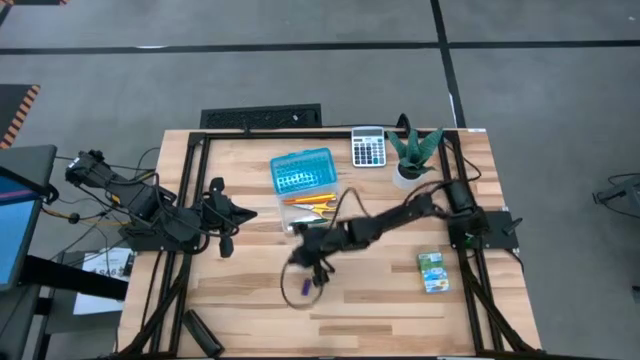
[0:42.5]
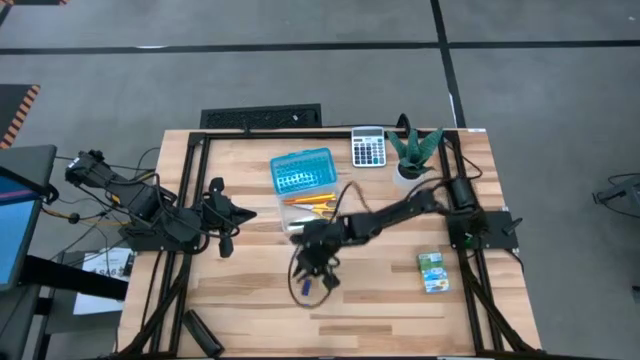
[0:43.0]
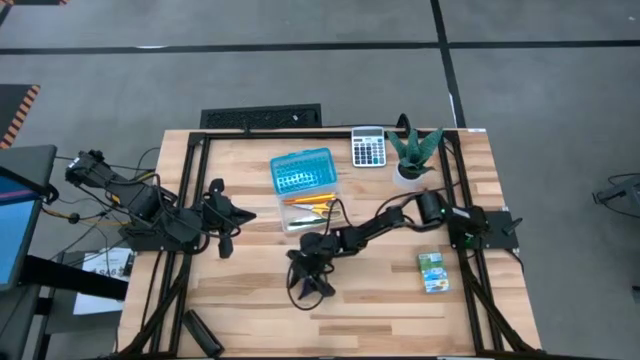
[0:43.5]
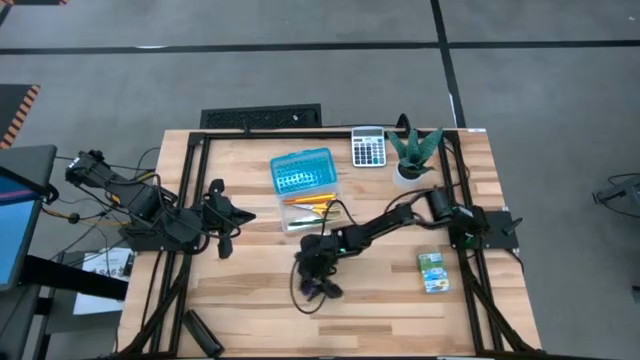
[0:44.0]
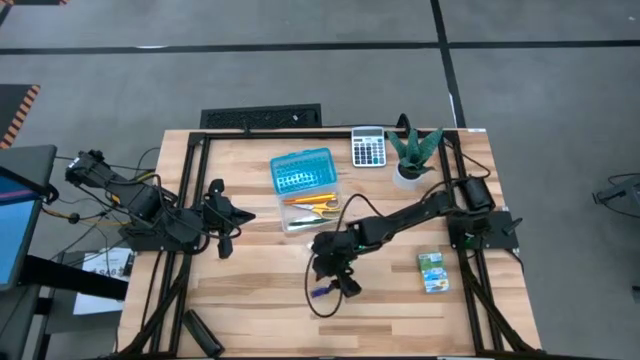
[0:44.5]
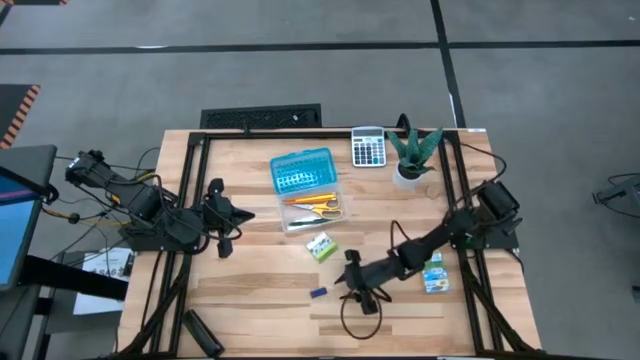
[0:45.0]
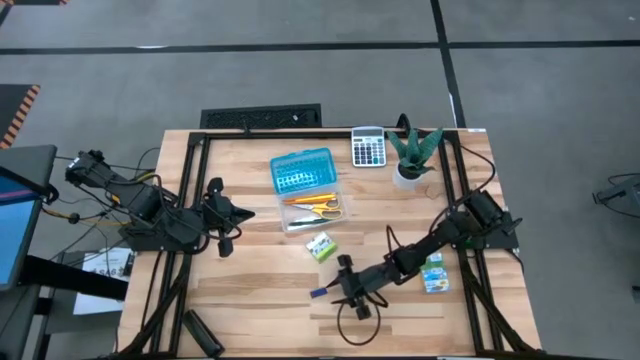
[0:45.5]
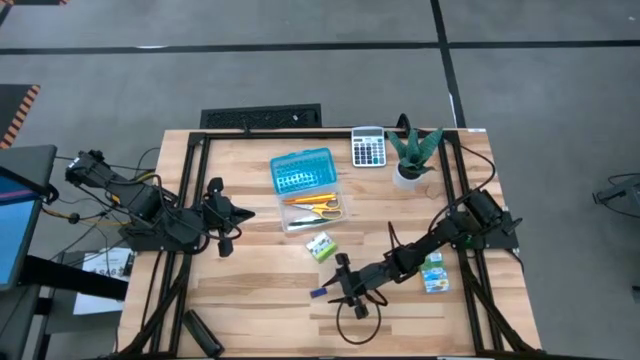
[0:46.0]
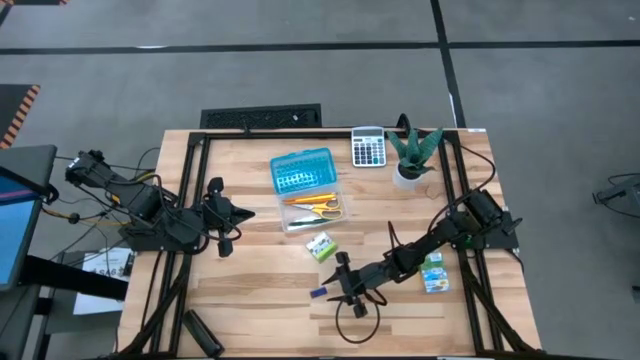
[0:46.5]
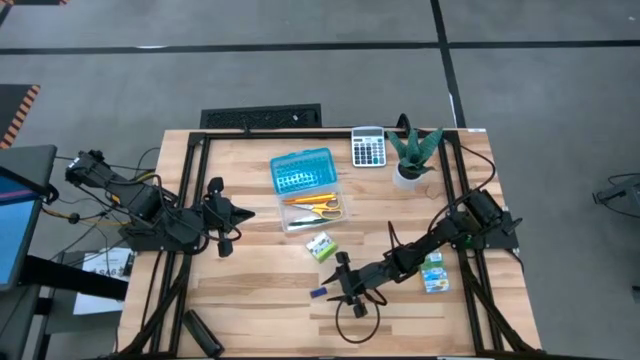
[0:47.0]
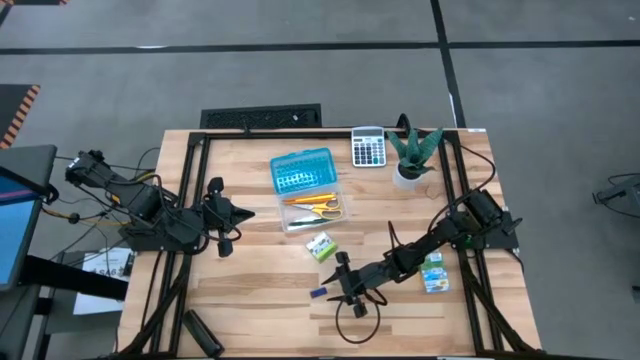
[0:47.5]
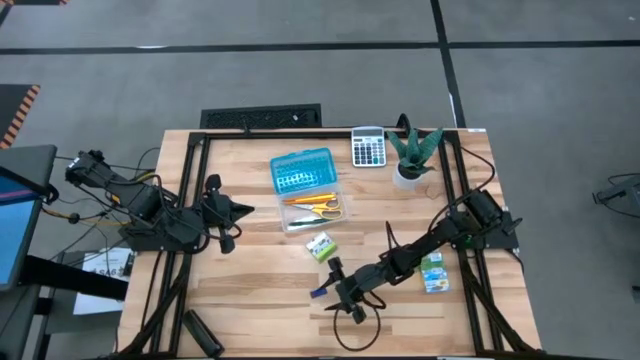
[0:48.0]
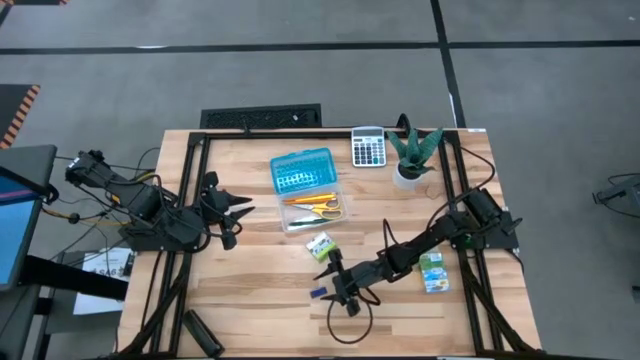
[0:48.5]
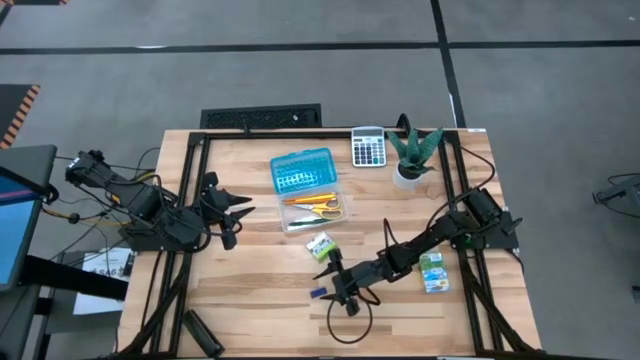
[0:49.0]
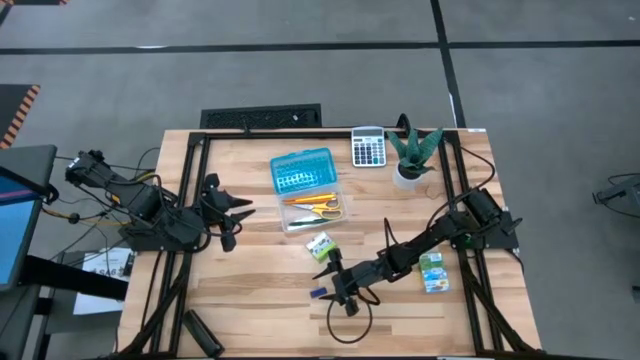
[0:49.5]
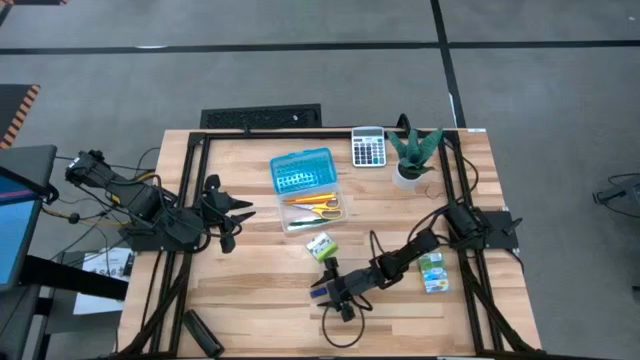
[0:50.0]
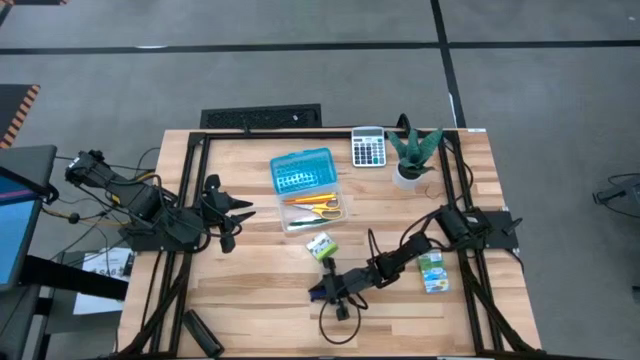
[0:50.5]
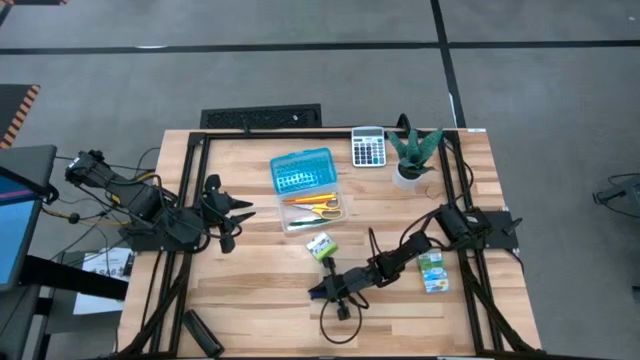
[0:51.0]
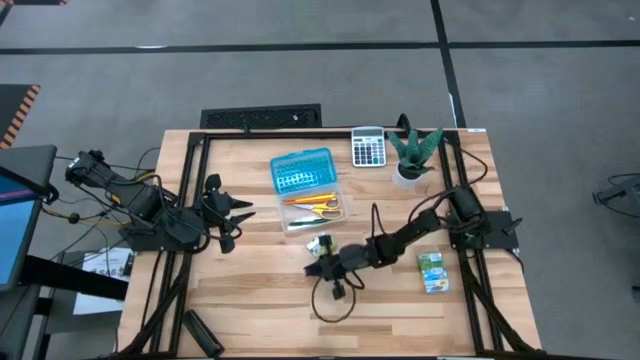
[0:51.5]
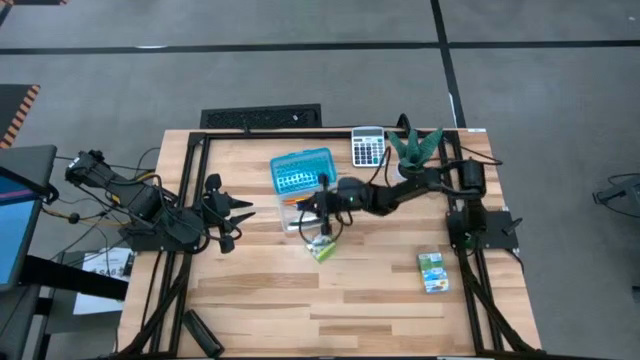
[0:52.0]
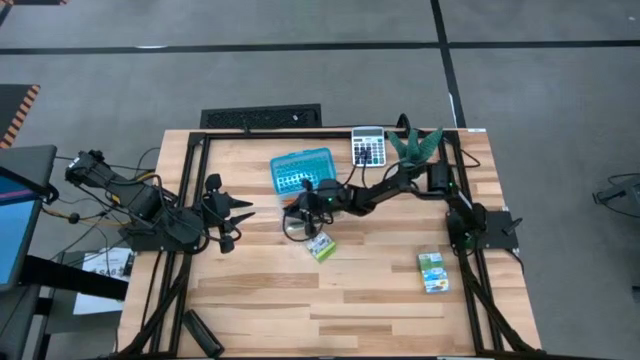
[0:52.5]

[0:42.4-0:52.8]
Task: Pack school essentials
Put the violet eraser into the supply box

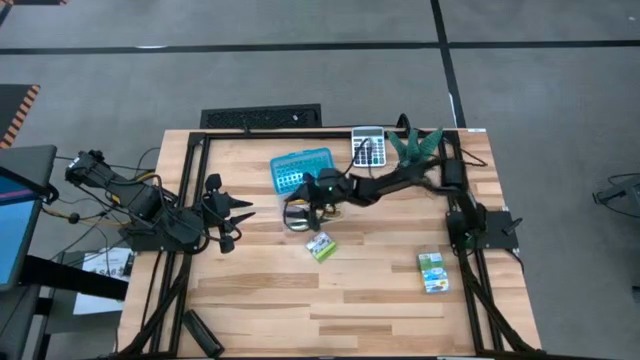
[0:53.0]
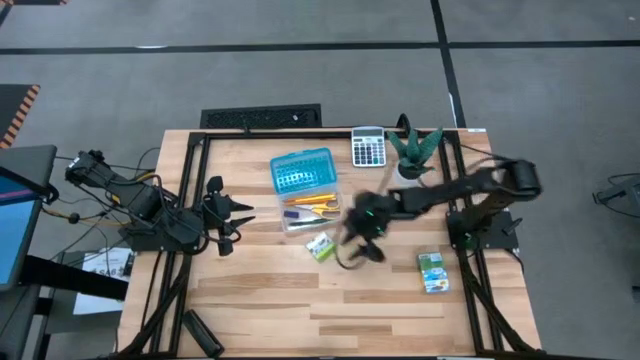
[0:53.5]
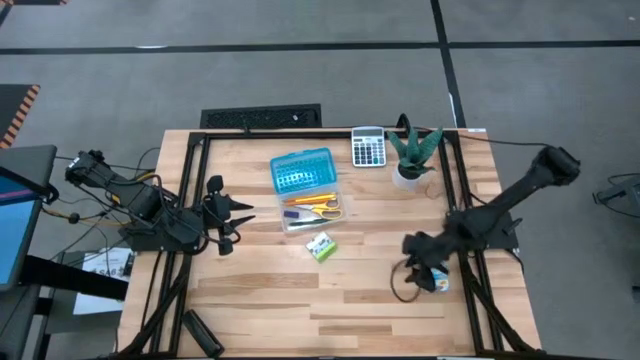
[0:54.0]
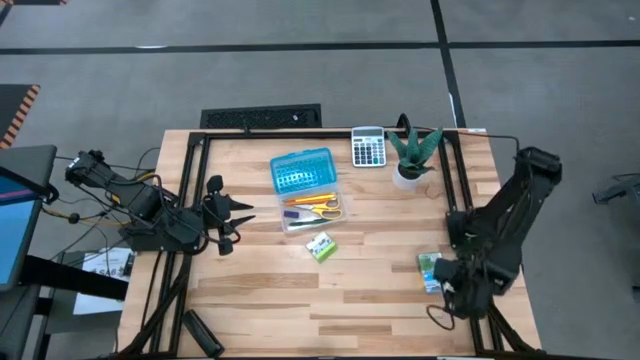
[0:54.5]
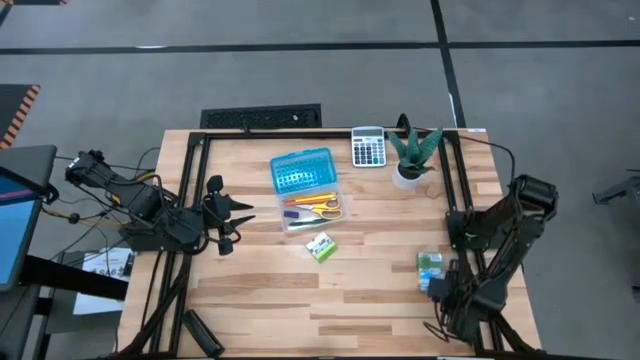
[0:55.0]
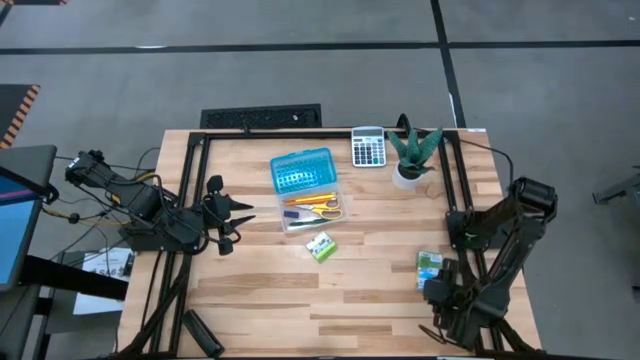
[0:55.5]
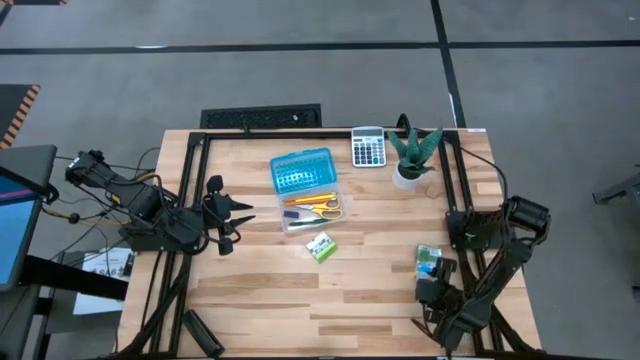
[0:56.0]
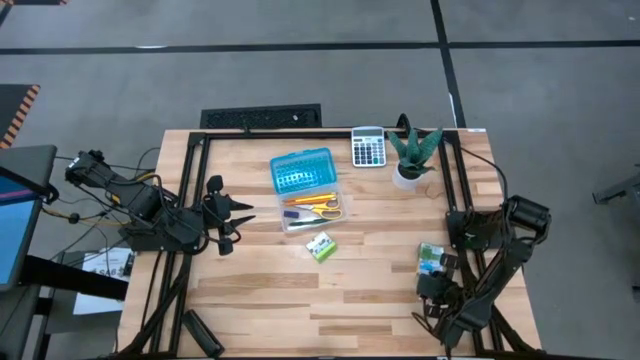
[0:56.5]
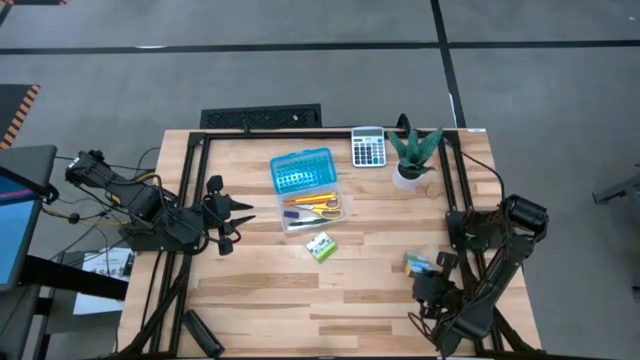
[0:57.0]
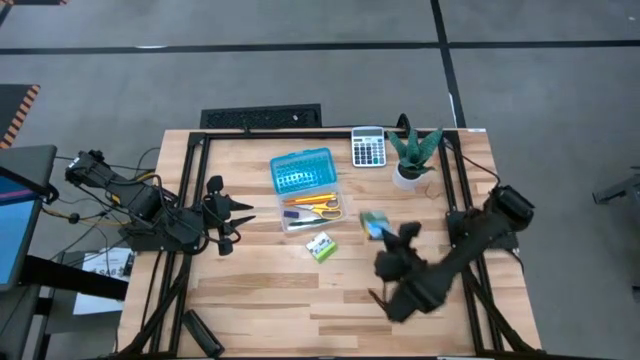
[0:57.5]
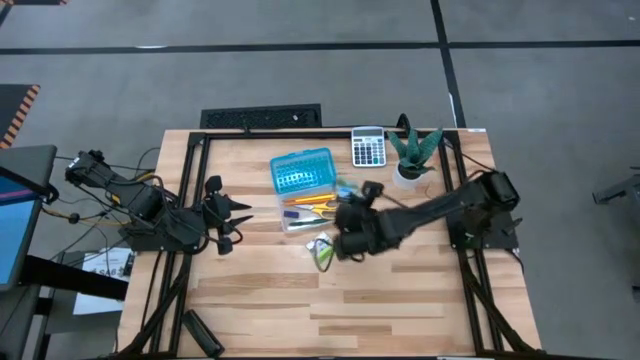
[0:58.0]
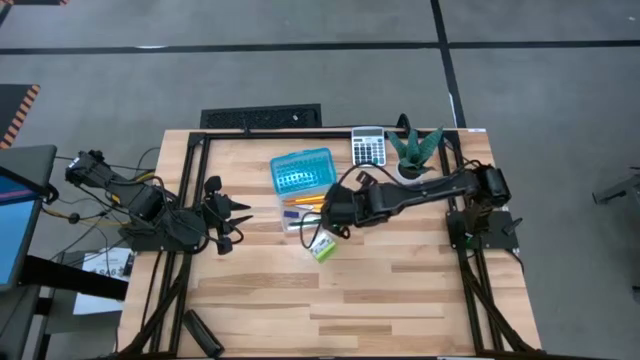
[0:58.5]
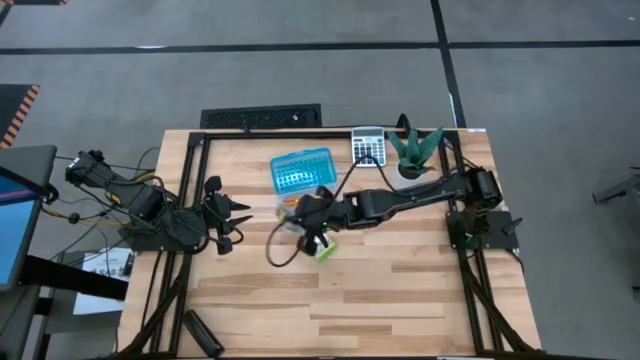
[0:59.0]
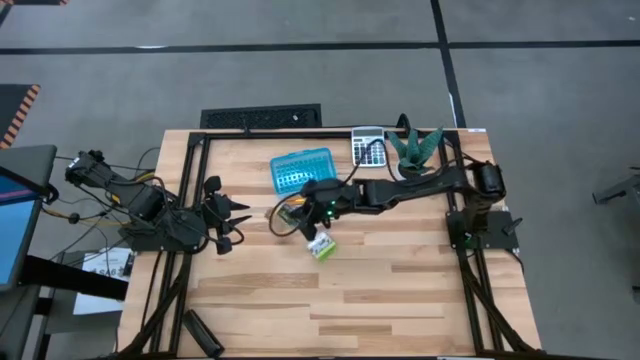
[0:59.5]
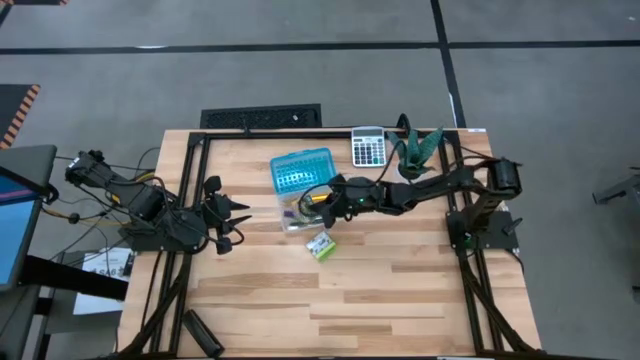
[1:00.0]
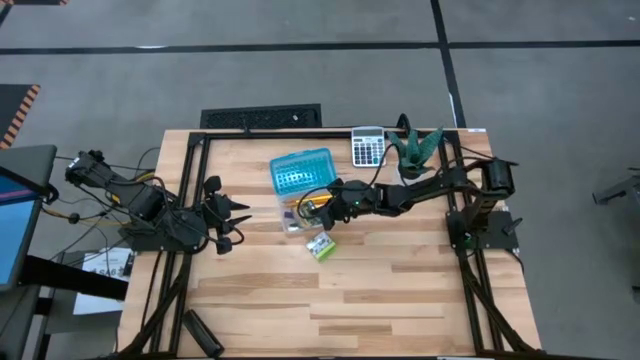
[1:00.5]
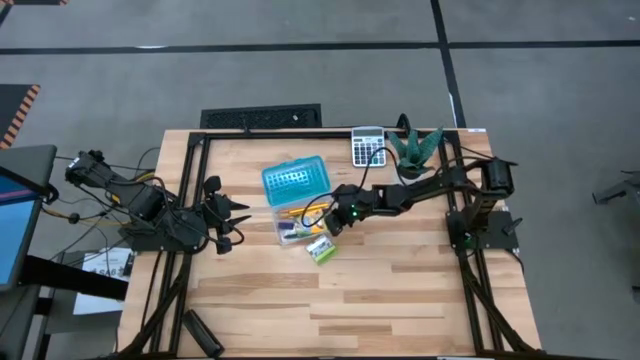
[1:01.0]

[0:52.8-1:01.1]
Put the yellow crayon box into the supply box

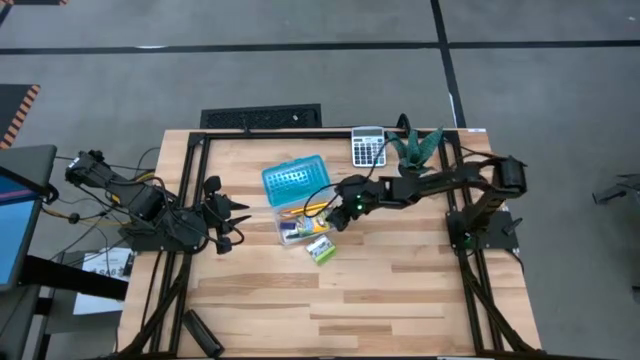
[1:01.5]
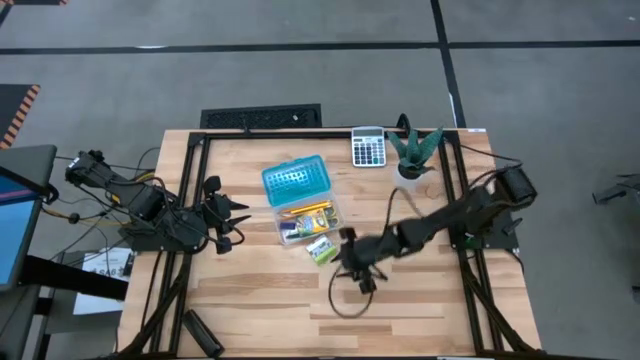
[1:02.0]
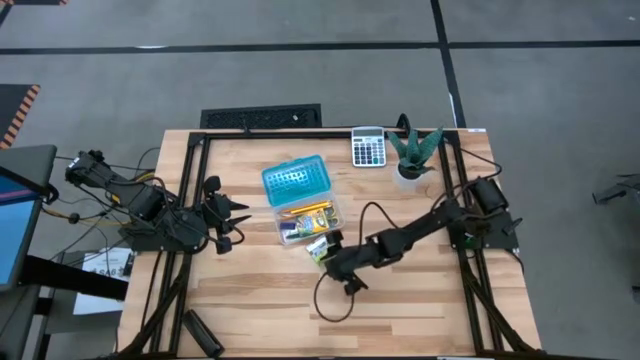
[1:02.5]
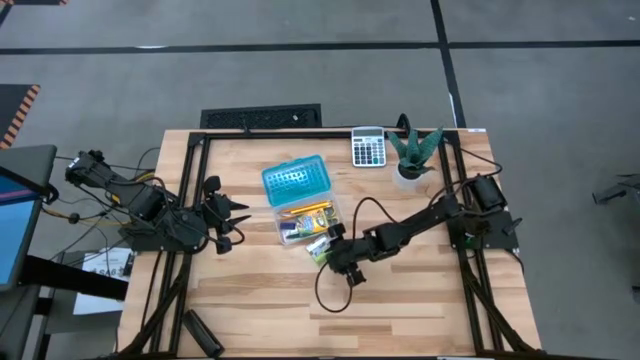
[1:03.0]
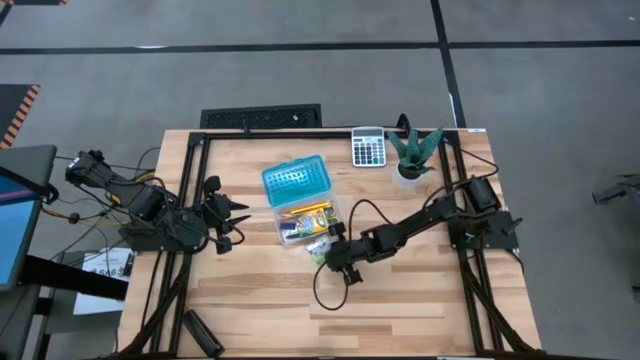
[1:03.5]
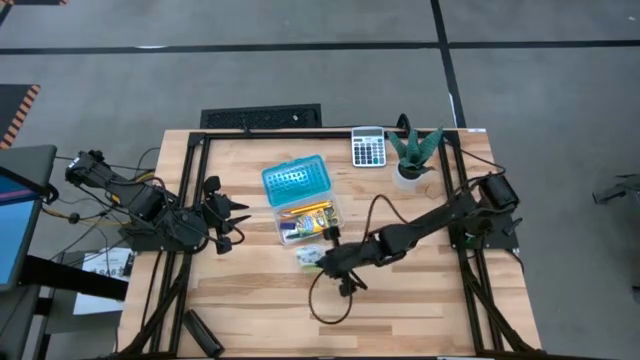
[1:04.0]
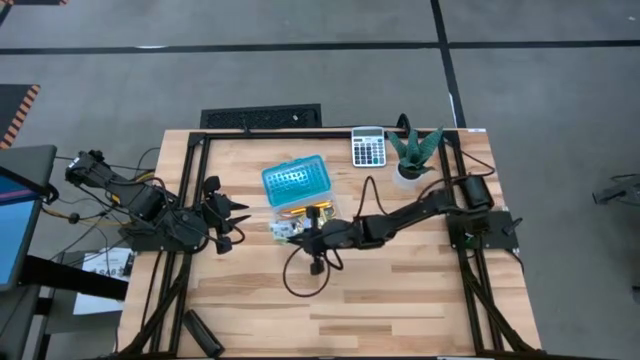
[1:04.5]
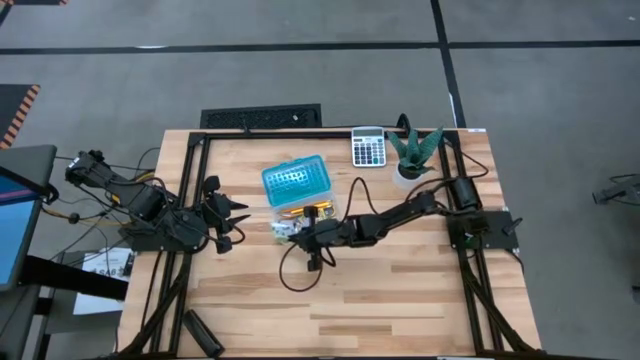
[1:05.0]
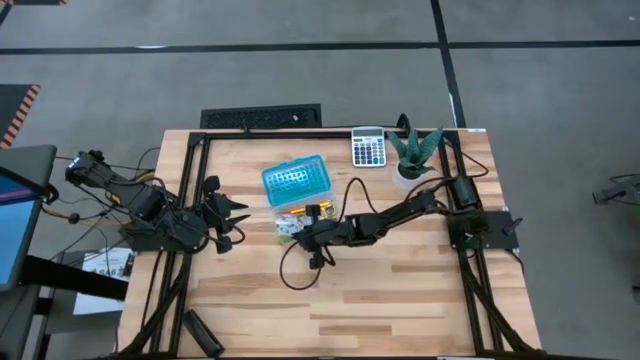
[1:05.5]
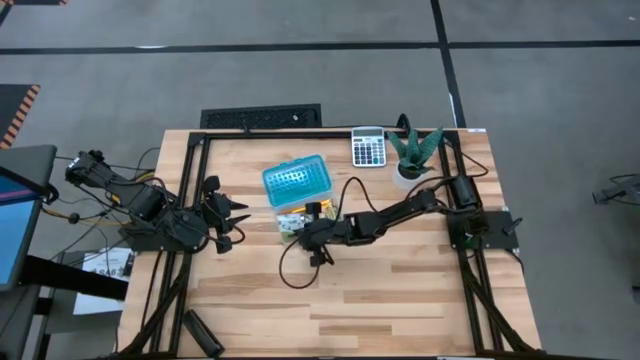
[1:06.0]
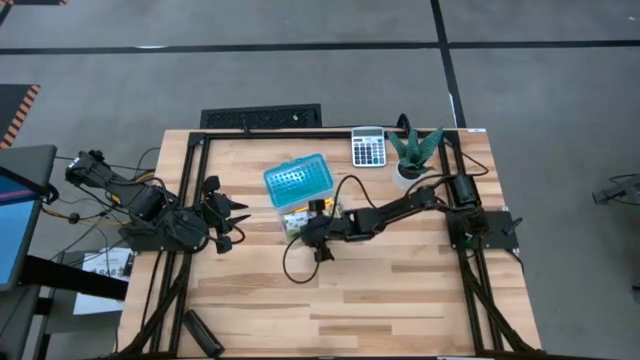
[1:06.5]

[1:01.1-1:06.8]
Put the green sticky notes into the supply box
